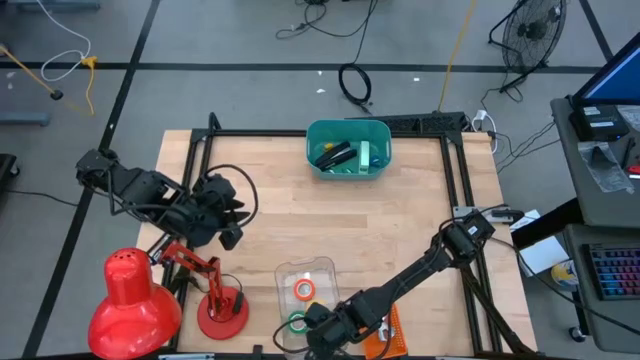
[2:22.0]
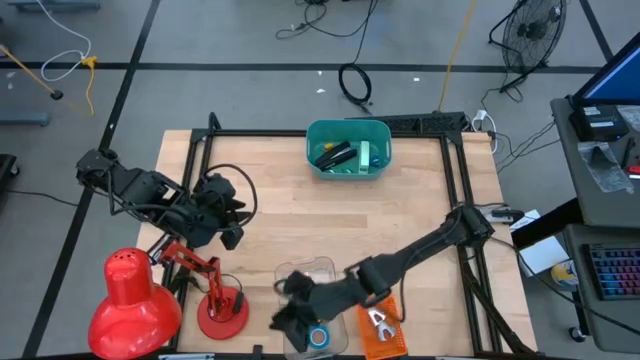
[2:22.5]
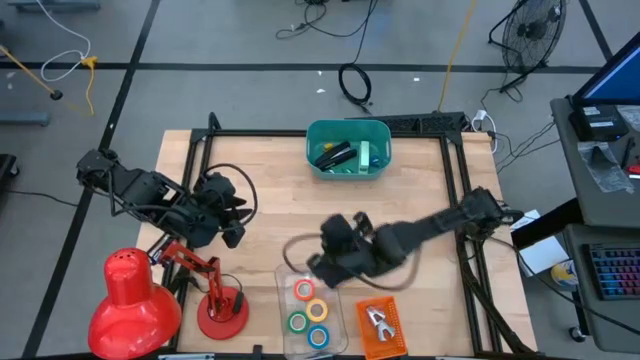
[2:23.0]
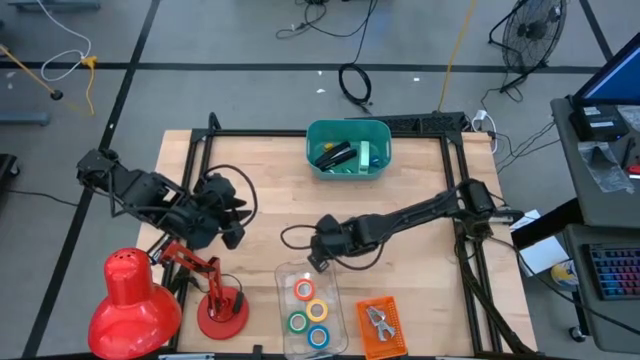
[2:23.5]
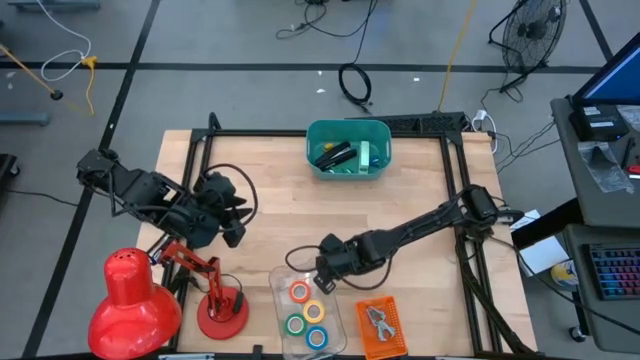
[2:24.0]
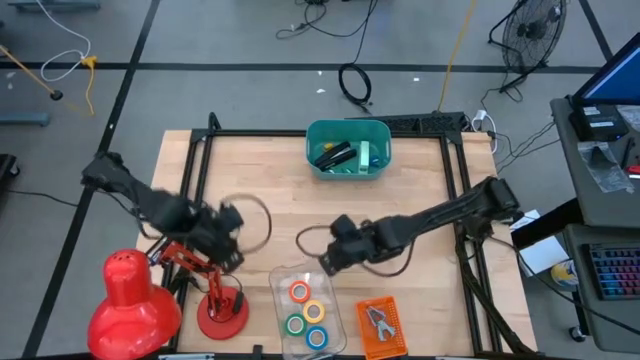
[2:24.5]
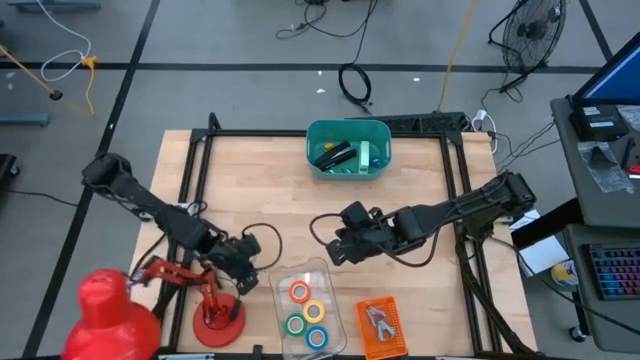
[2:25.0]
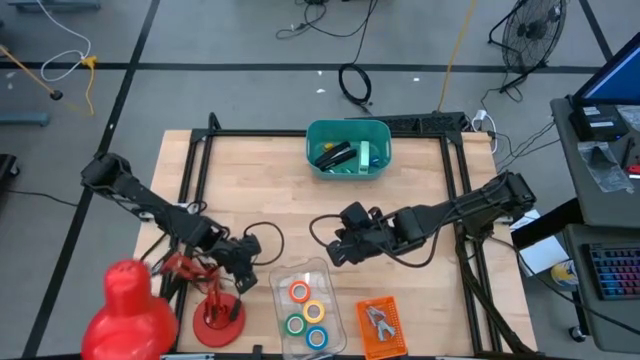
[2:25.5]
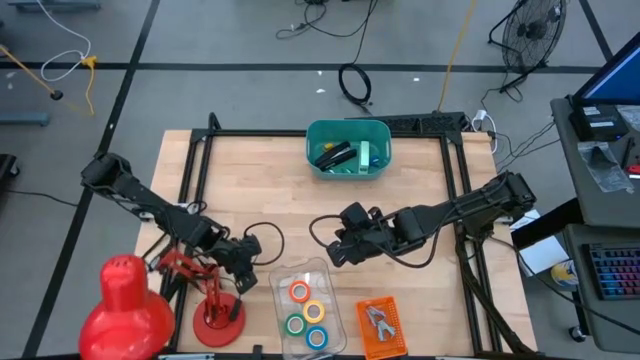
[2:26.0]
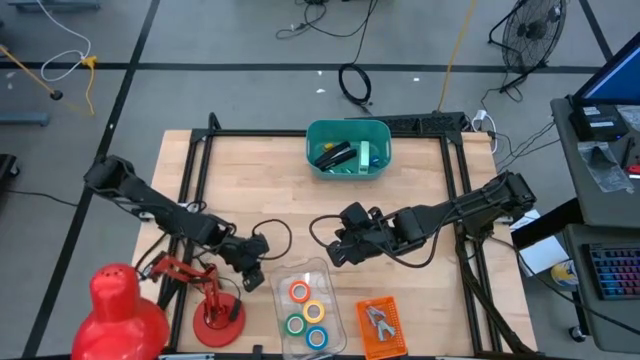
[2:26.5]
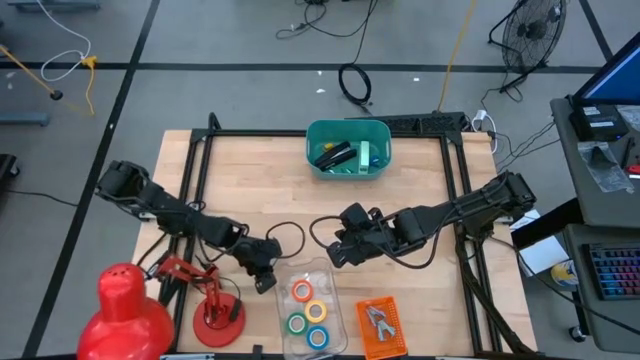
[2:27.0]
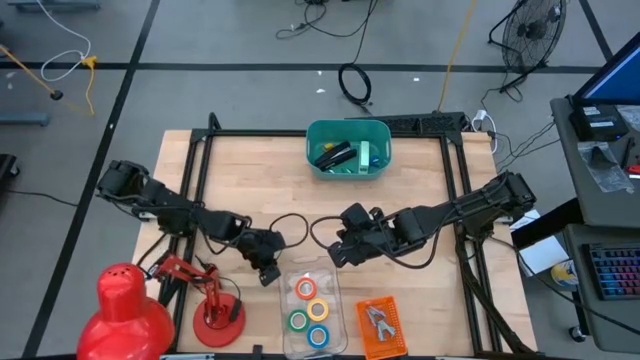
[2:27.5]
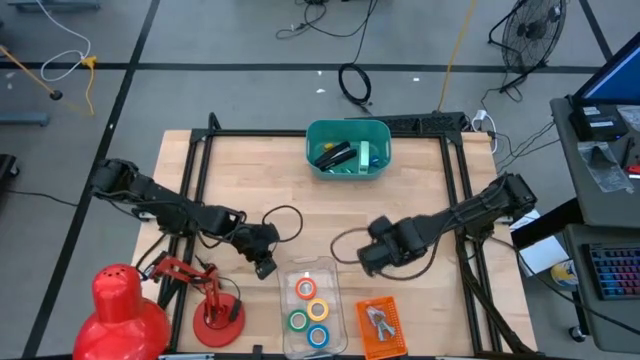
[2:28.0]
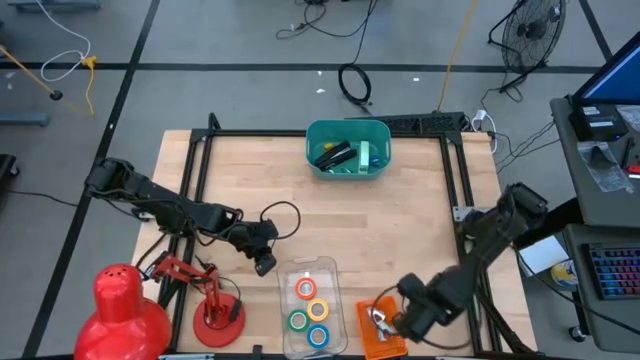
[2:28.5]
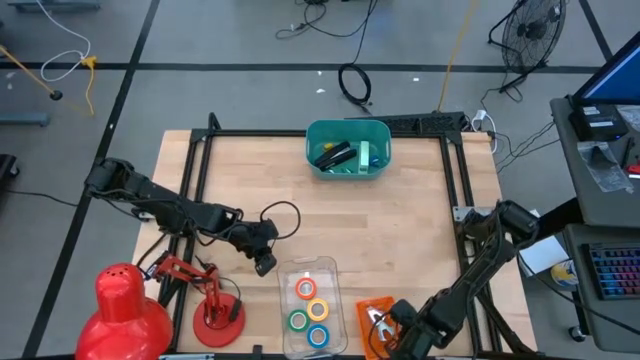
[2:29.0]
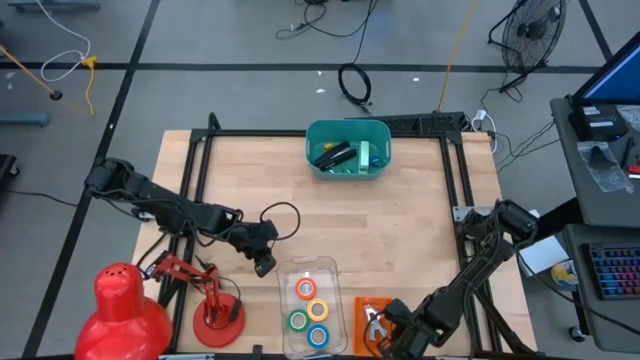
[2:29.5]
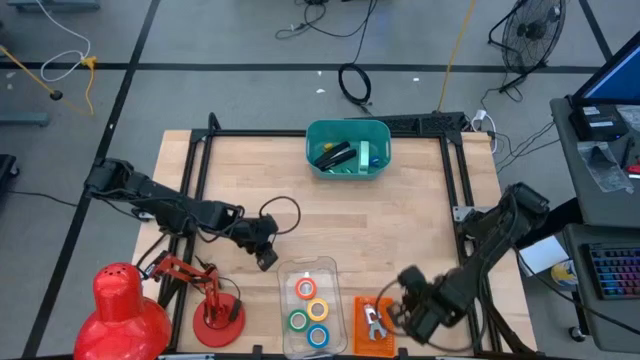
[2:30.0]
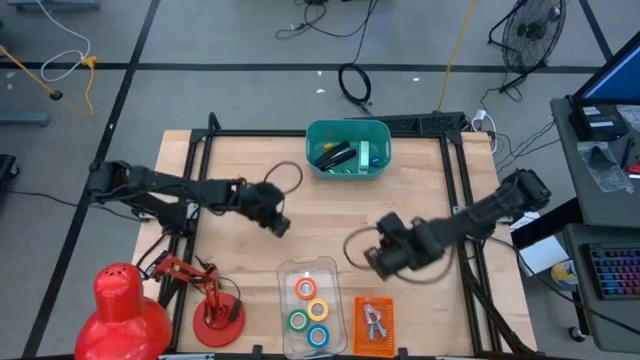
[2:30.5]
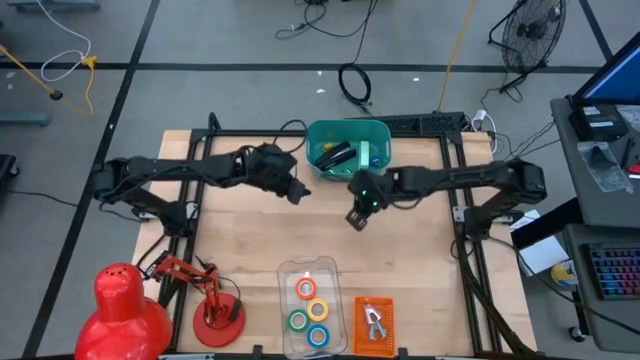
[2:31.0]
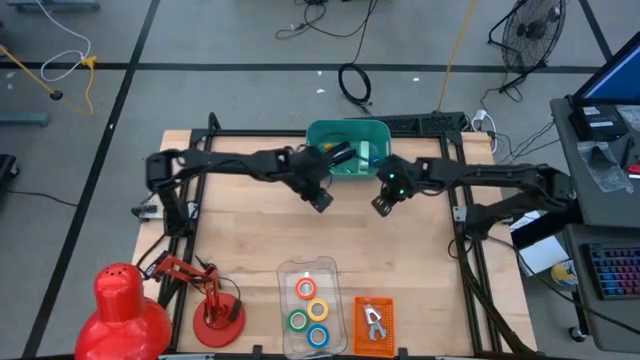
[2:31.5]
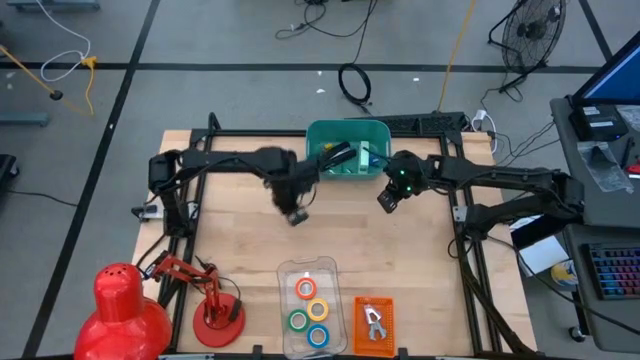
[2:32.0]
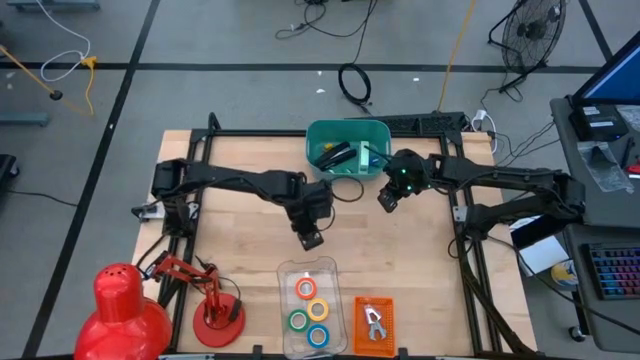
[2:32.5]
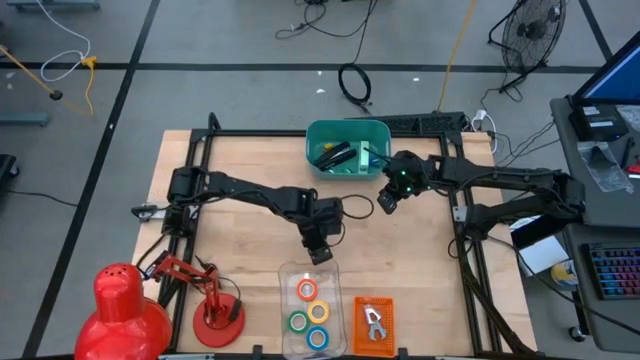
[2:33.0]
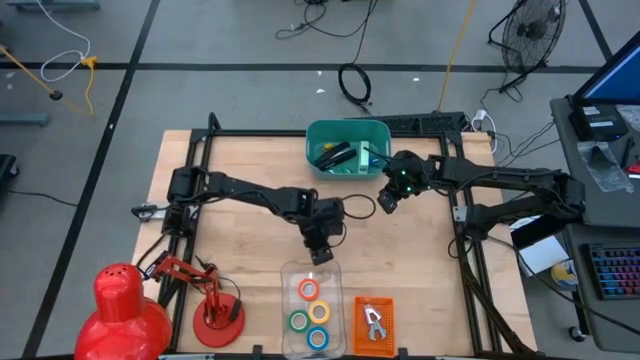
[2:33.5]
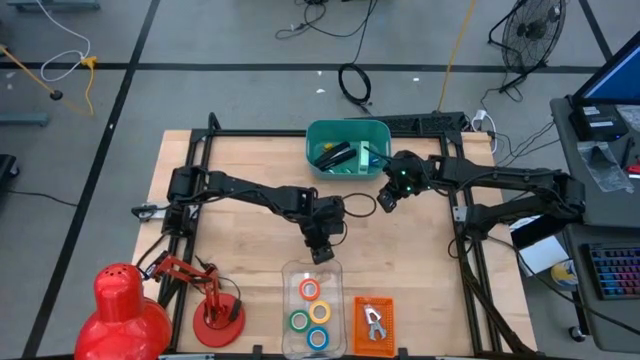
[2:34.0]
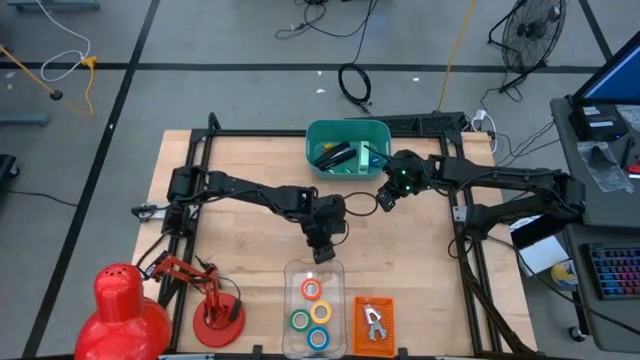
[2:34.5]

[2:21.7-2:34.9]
Task: Pick and place Stapler, Stapler remover, tape
Adjust the bins

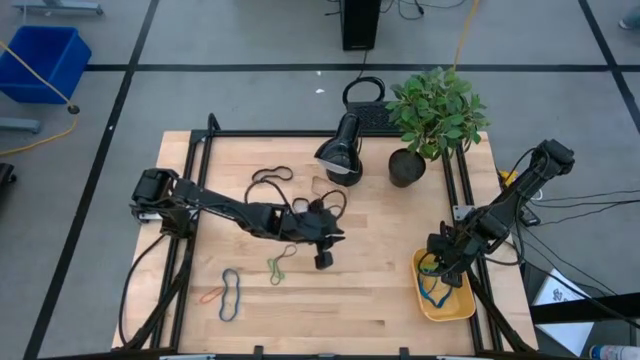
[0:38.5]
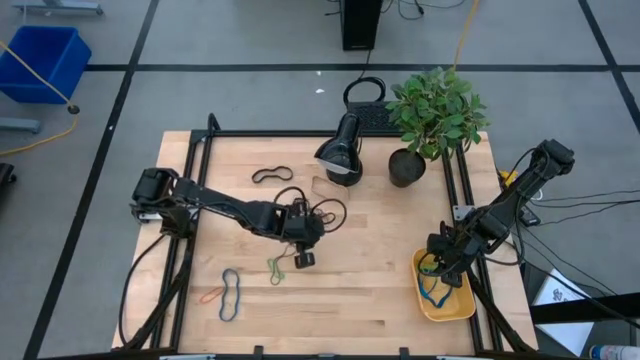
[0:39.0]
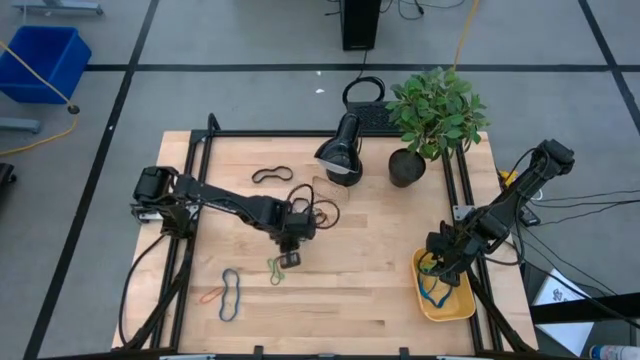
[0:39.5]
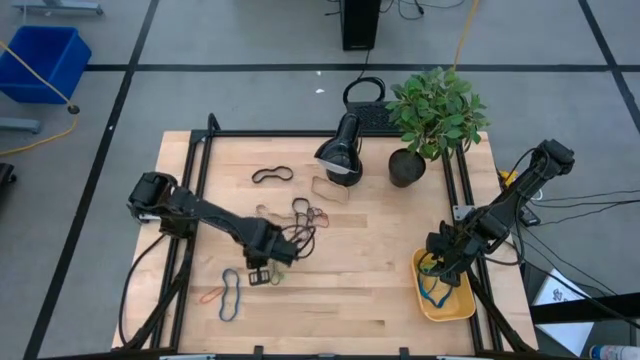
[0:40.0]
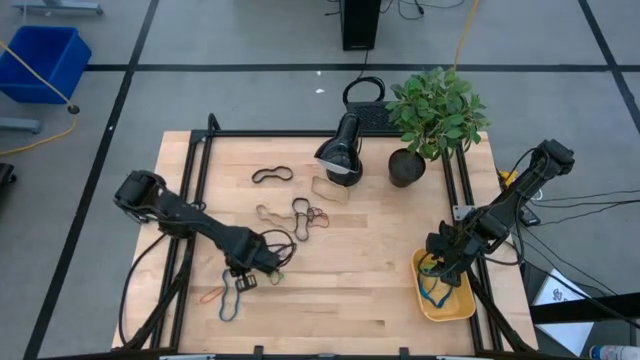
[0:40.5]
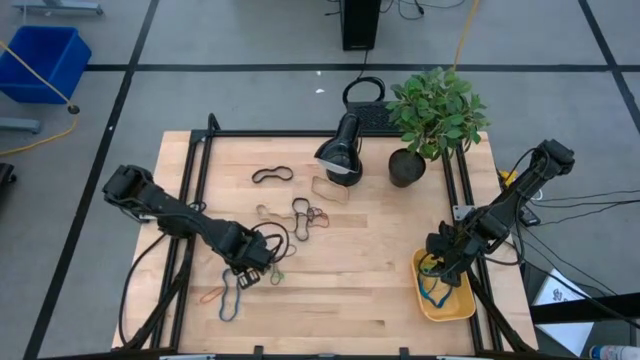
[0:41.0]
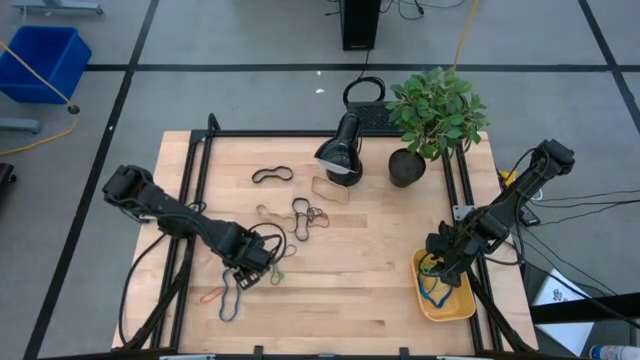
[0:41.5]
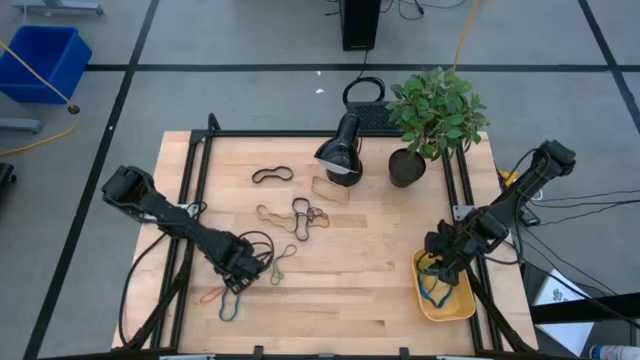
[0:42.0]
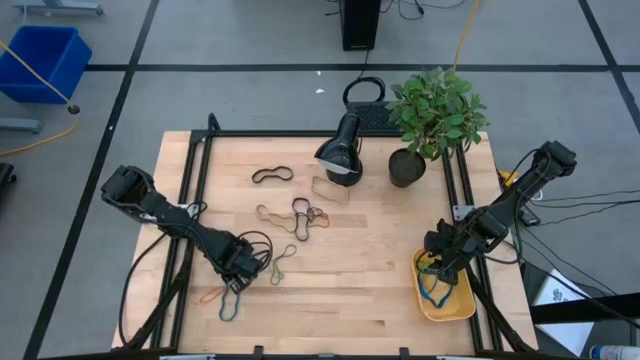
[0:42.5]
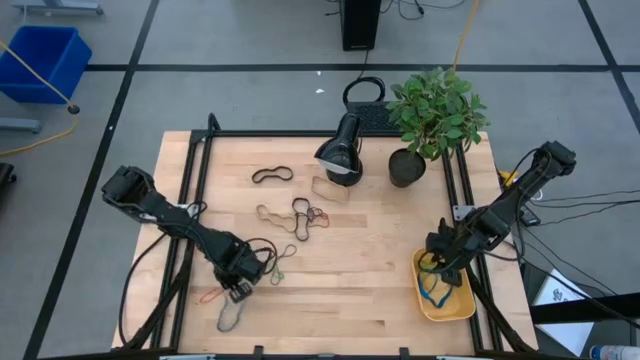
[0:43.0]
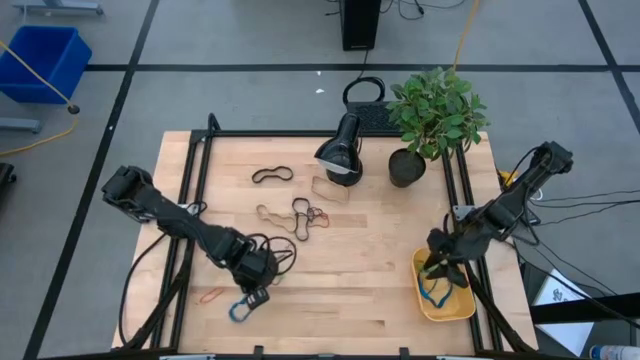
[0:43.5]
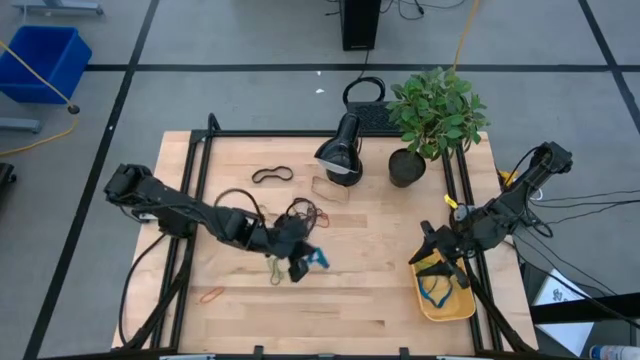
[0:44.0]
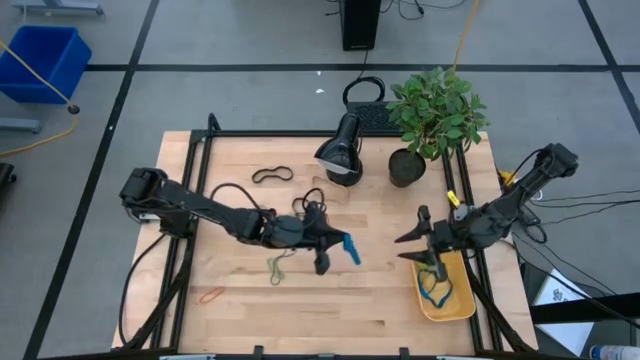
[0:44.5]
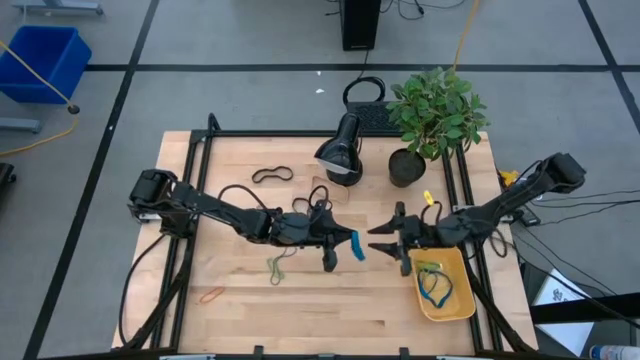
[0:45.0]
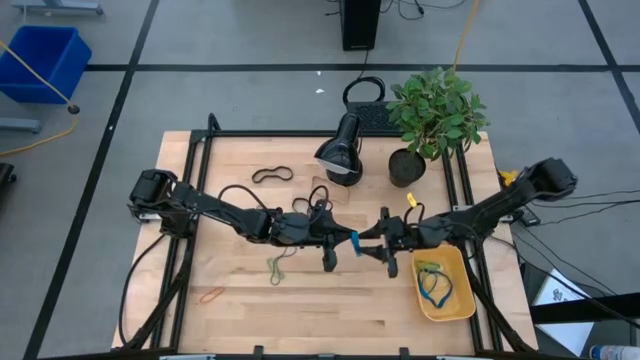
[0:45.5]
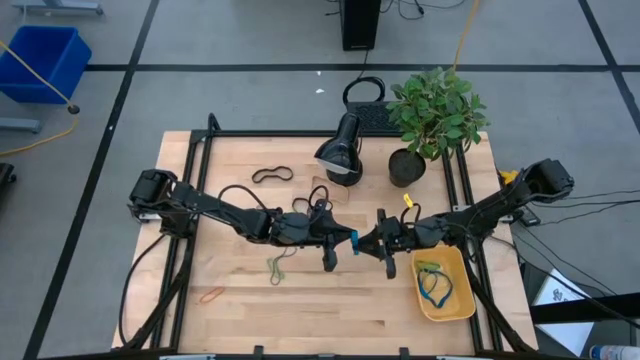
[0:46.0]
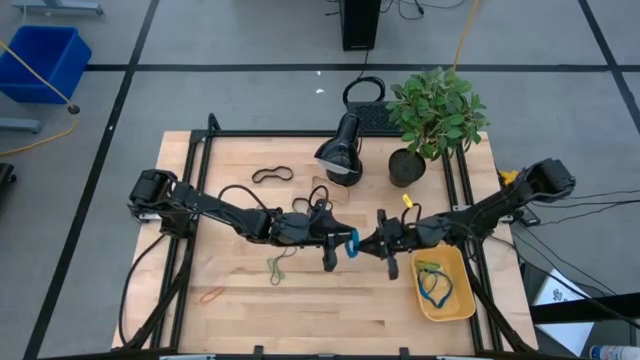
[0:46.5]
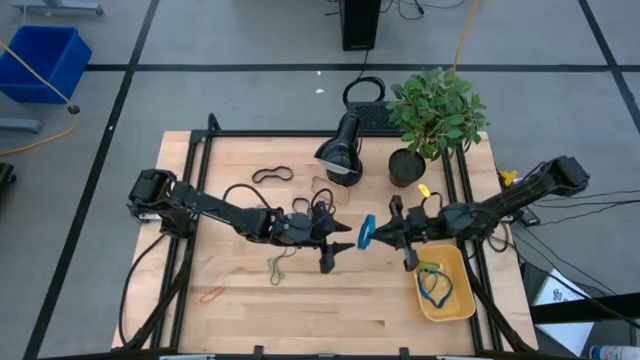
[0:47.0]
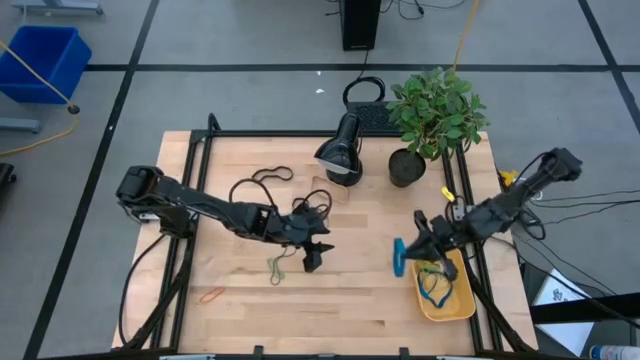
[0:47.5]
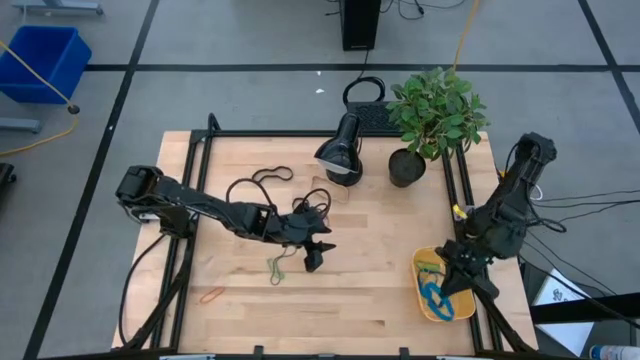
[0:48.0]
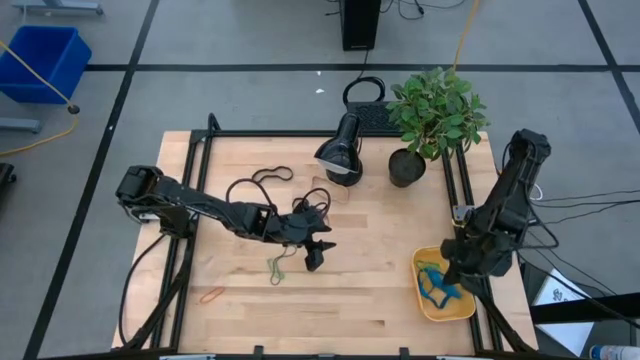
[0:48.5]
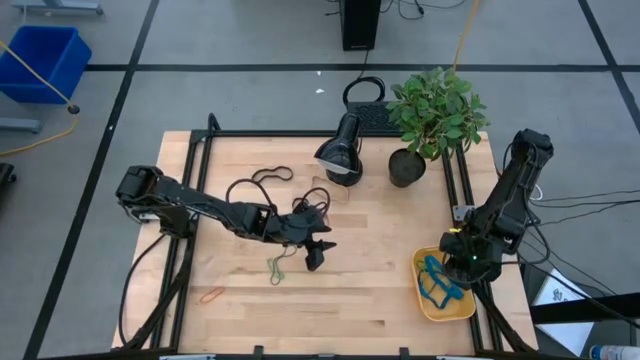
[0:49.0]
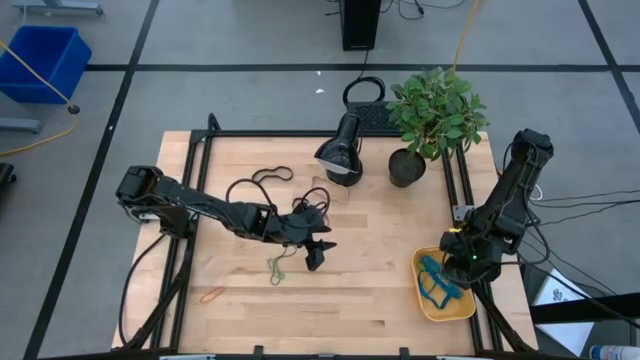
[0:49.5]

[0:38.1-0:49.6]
Task: Pick and place rubber bands into bin
Put the blue rubber band into the yellow bin
